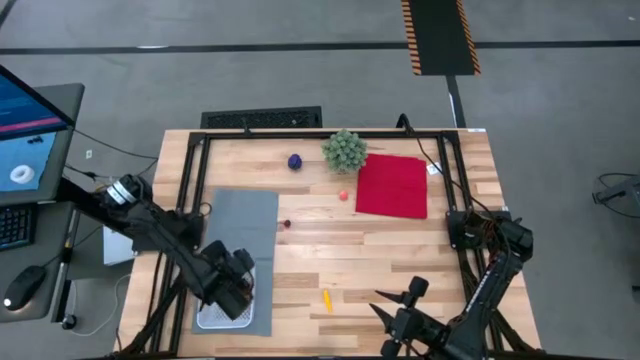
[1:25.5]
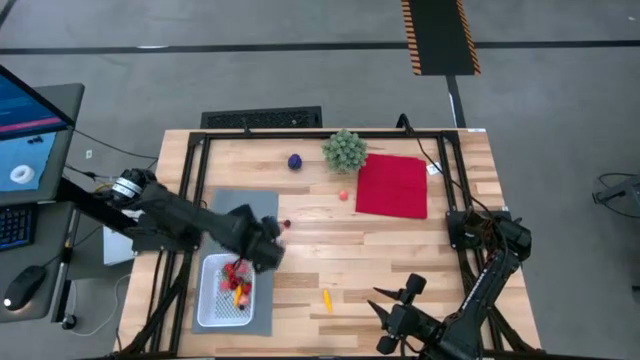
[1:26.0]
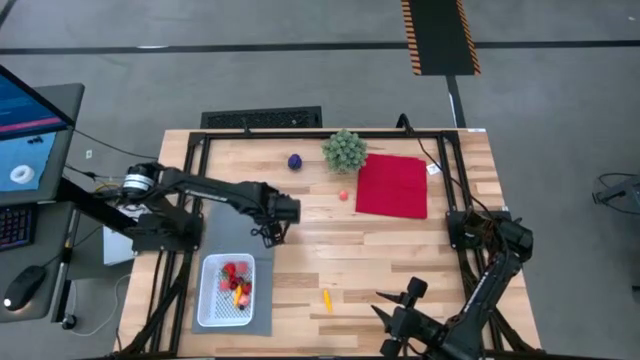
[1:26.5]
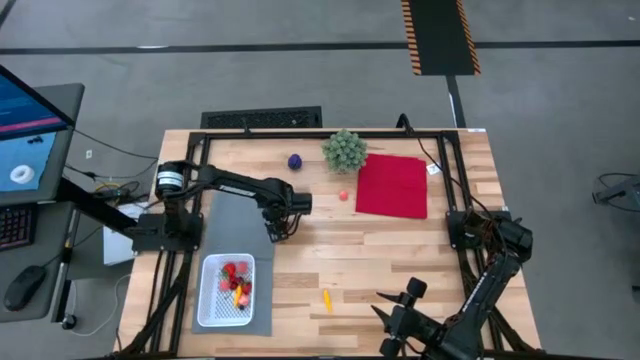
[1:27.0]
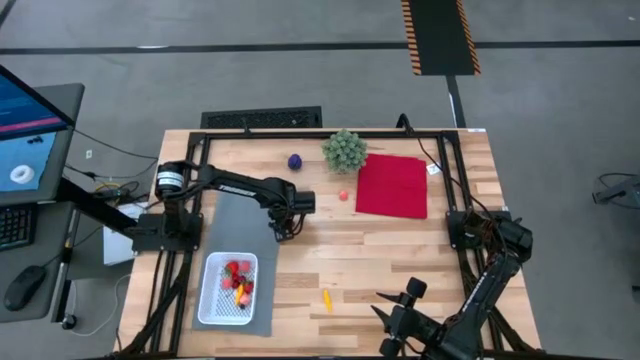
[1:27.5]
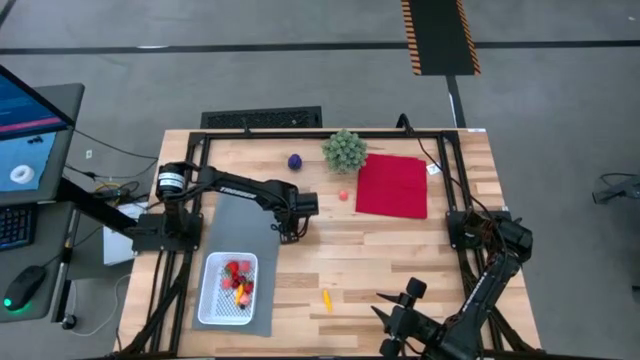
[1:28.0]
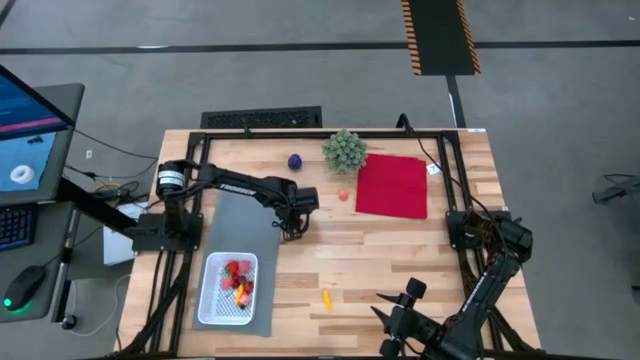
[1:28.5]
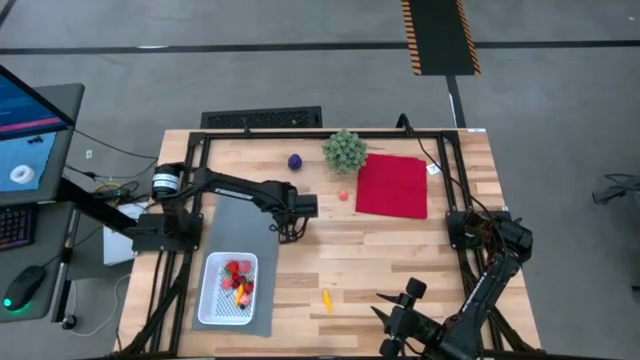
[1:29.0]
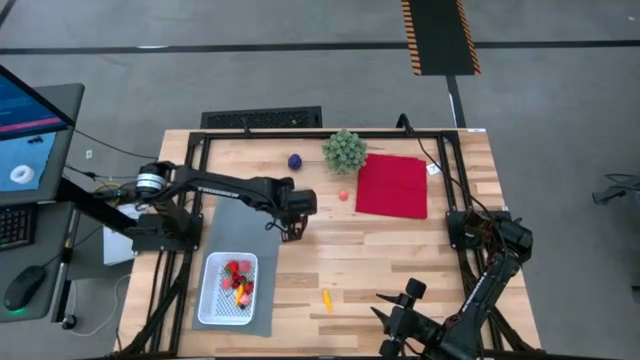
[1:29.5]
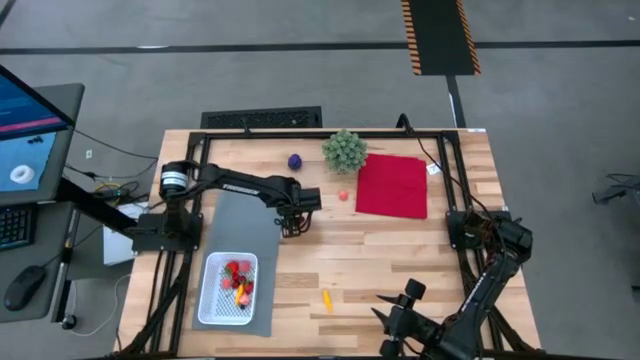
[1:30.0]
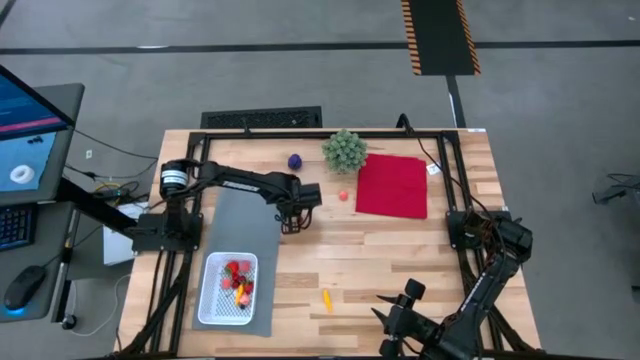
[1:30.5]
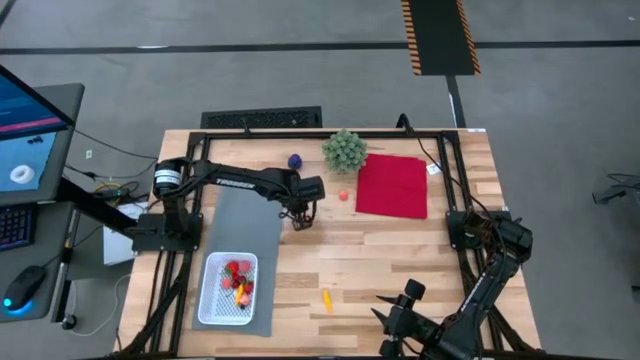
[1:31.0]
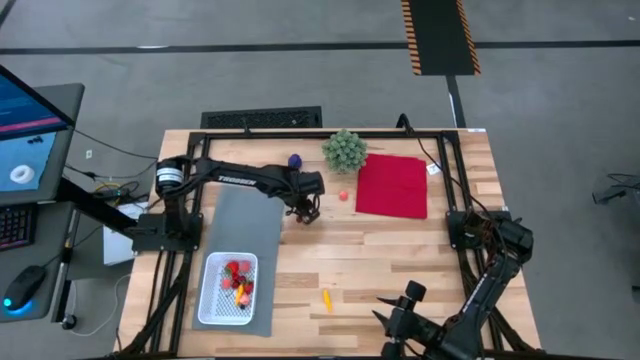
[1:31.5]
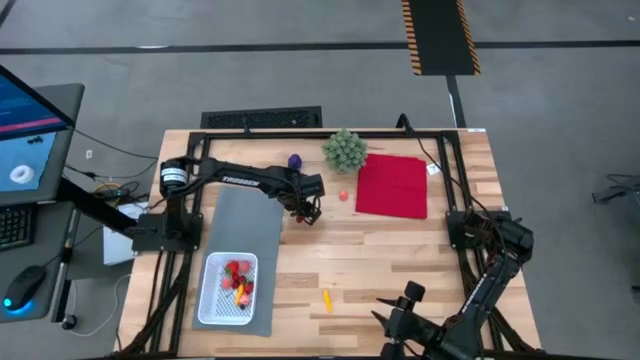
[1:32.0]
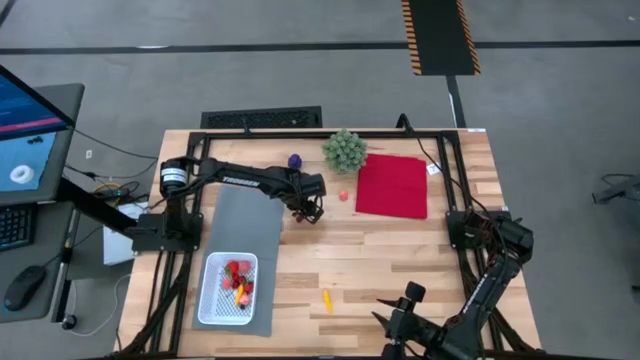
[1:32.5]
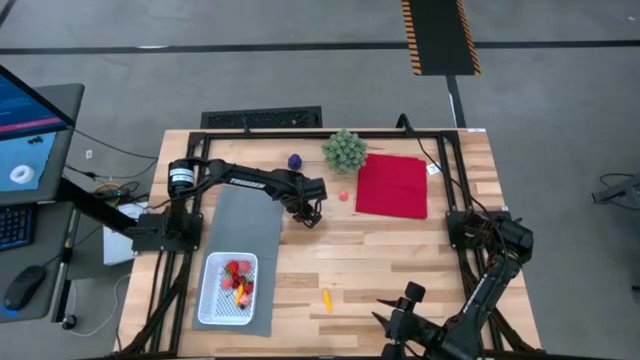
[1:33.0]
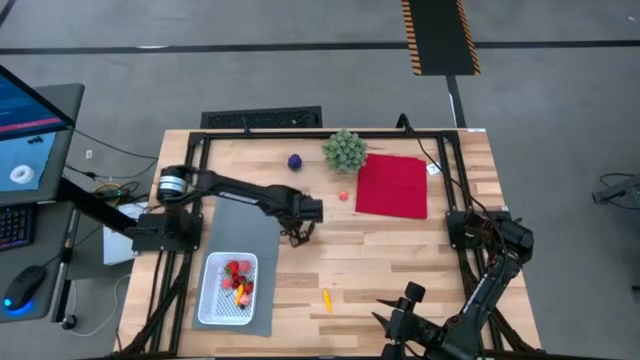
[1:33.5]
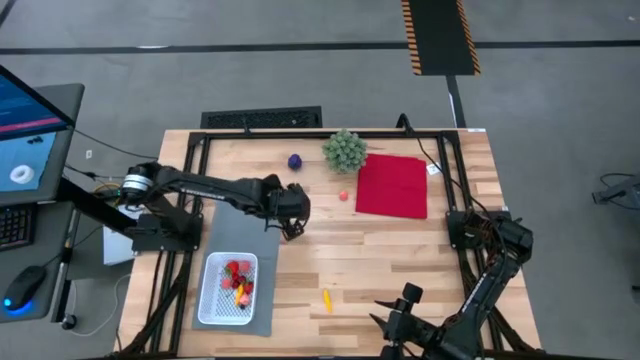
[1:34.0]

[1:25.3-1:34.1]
Task: Pick and placing Produce into tupperware
Put the red cherry into the white basket

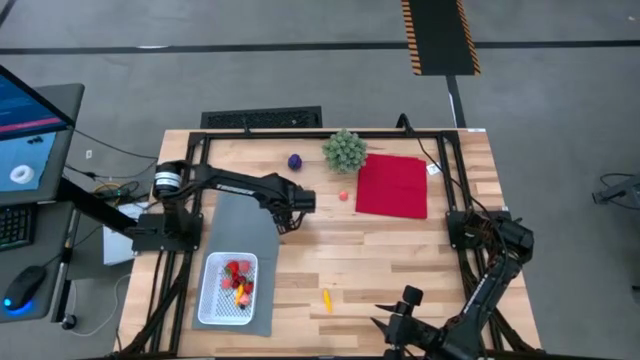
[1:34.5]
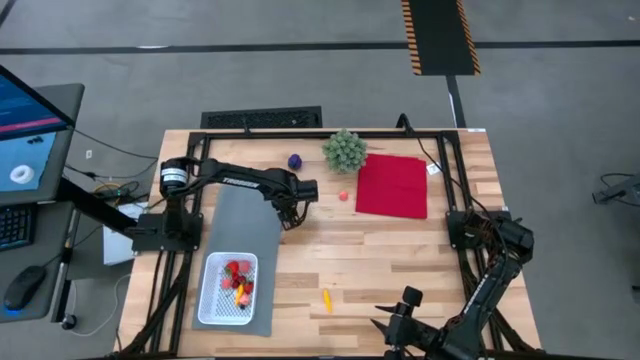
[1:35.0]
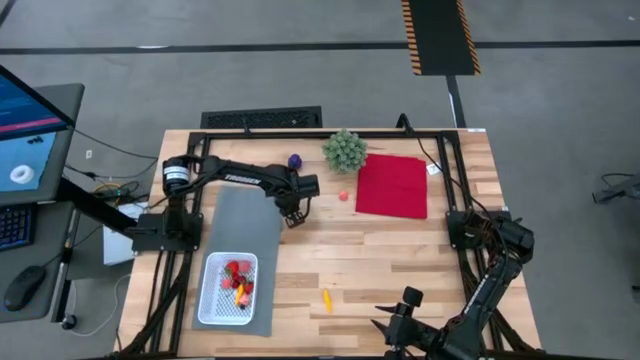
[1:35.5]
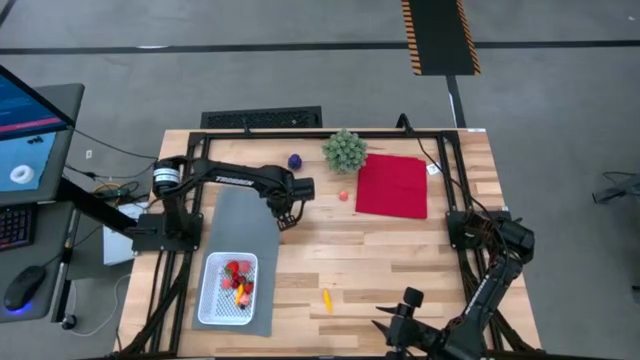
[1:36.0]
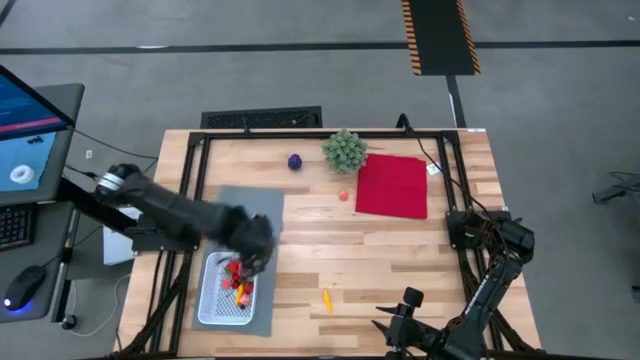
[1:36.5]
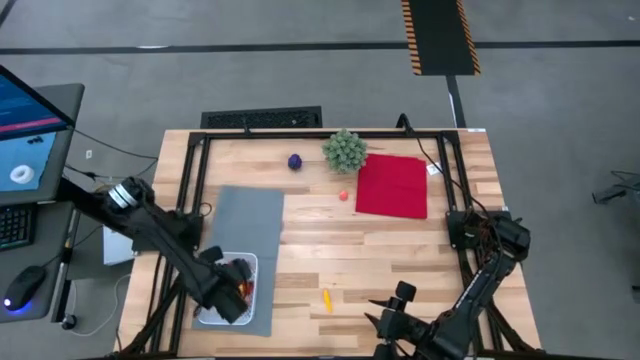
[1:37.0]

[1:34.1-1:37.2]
Put the red cherry into the white basket

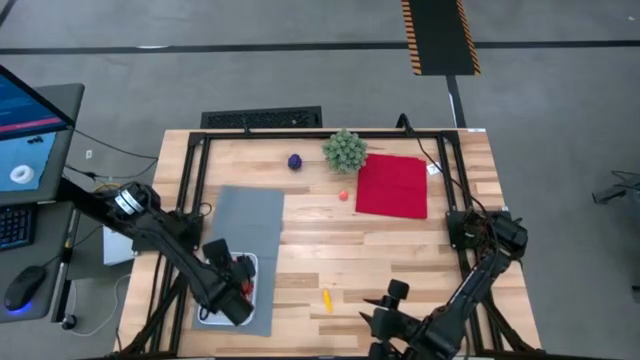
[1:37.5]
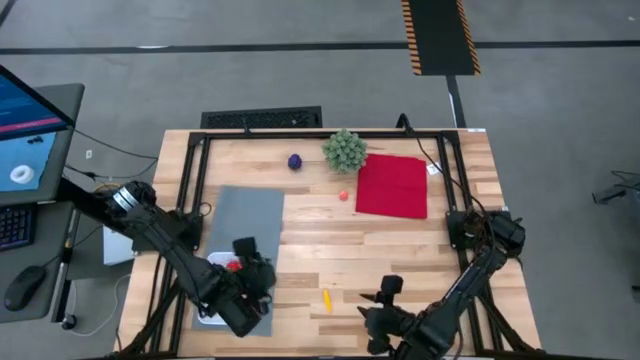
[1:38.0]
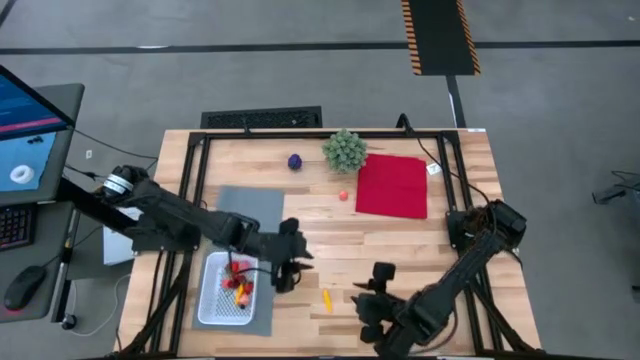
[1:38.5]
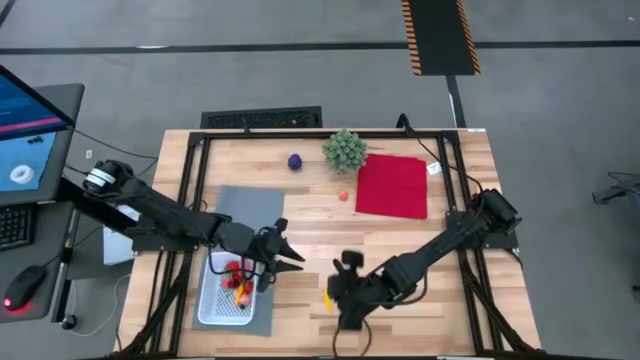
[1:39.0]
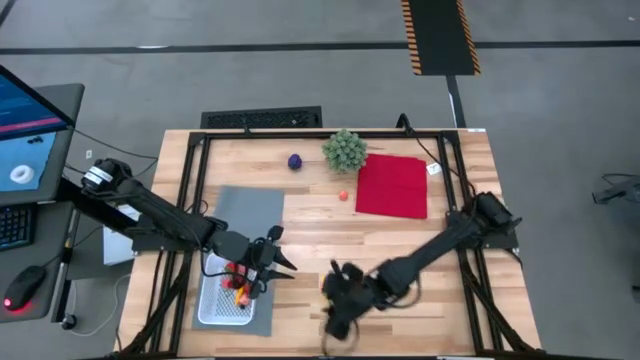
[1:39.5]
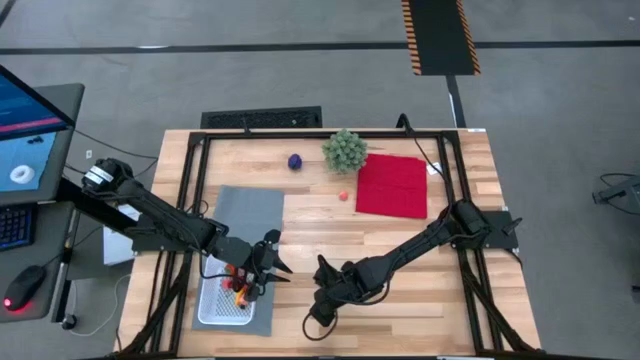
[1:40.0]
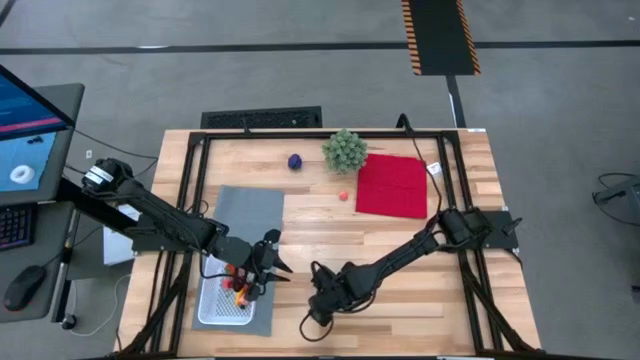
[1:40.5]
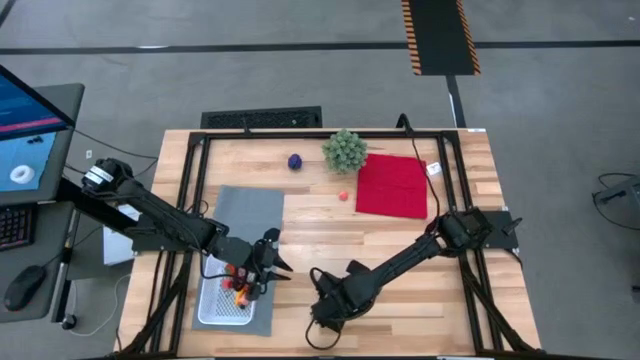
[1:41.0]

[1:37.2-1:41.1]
Put the yellow corn into the white basket

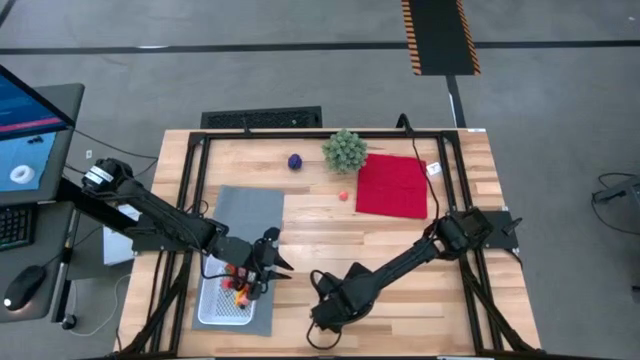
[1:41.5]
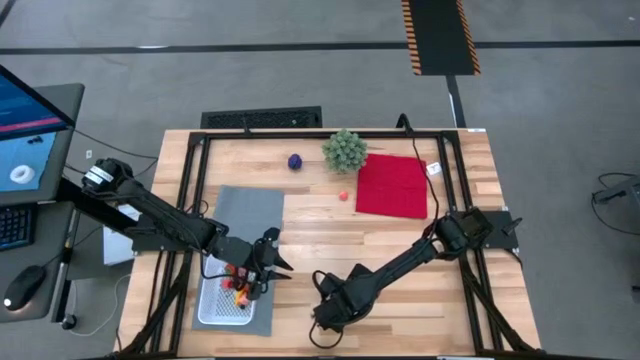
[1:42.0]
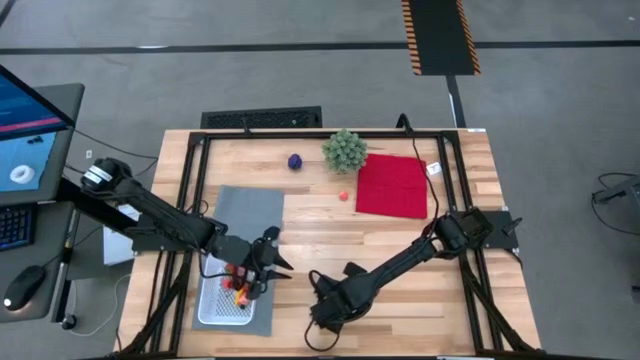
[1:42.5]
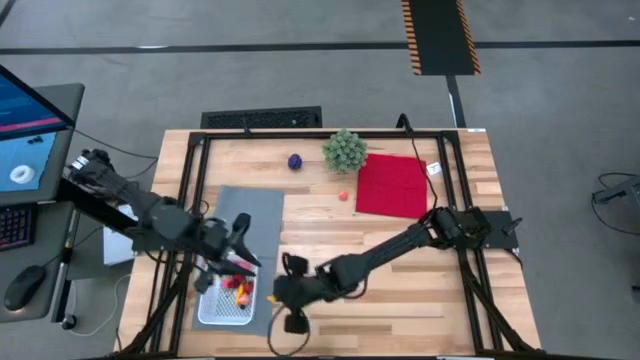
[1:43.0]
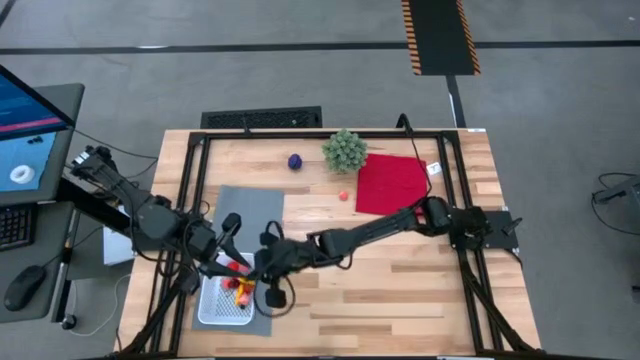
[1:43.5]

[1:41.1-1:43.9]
Put the yellow corn into the white basket

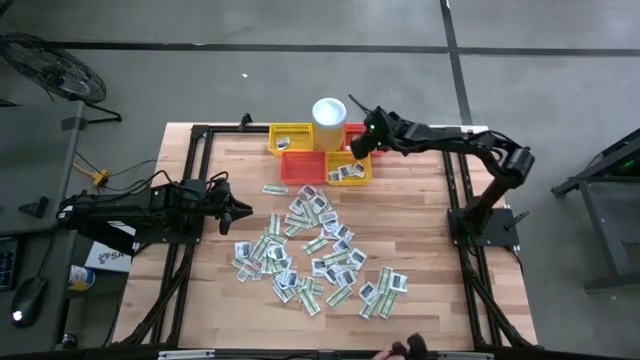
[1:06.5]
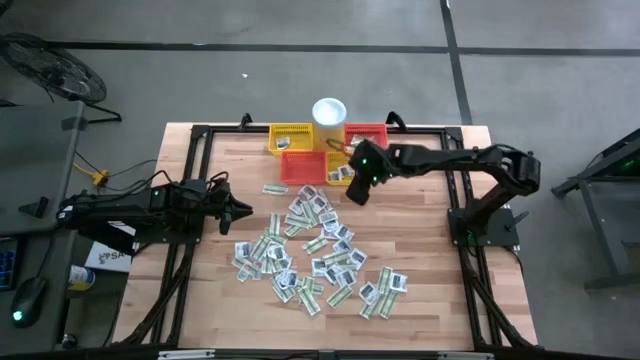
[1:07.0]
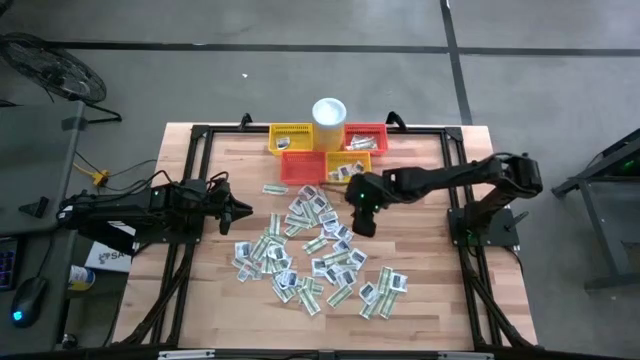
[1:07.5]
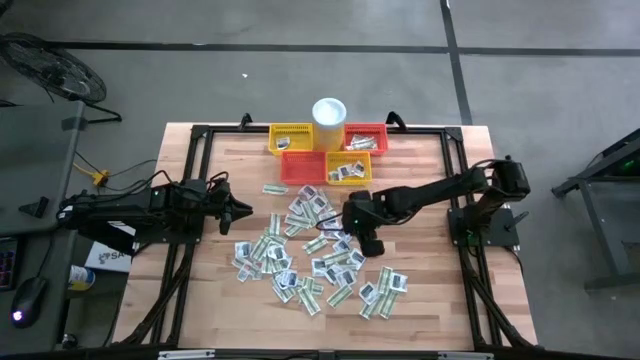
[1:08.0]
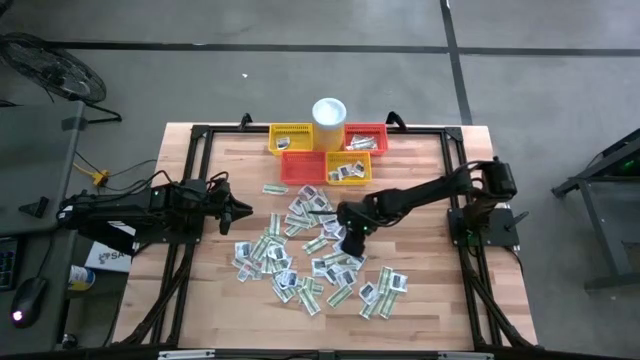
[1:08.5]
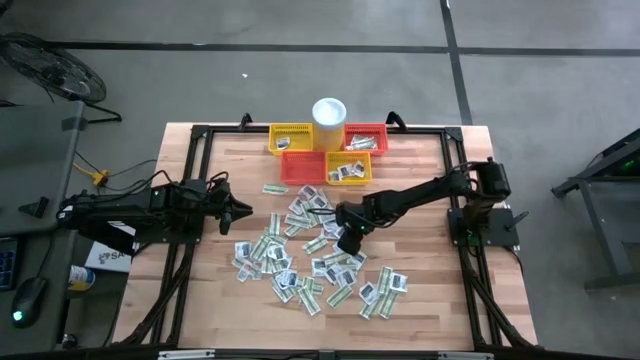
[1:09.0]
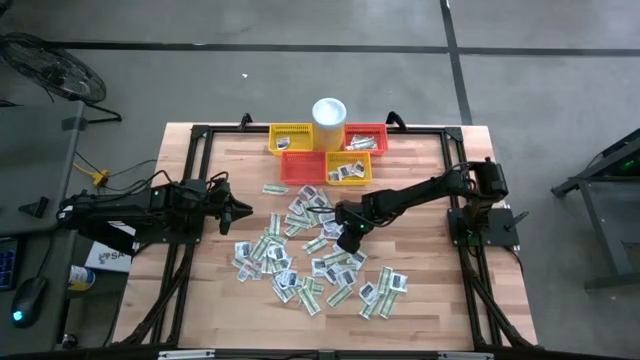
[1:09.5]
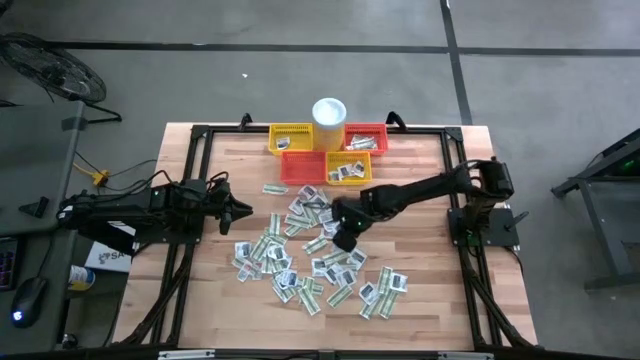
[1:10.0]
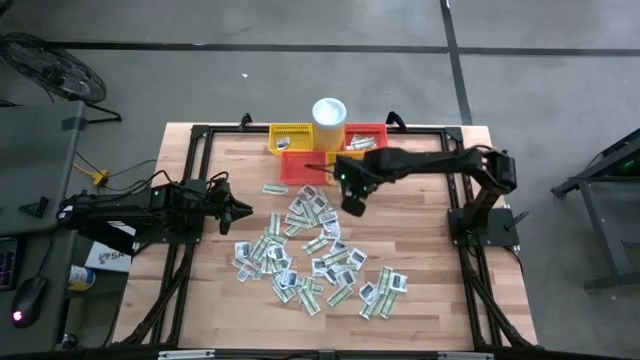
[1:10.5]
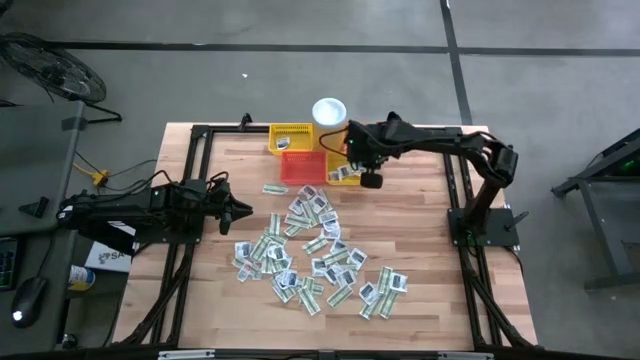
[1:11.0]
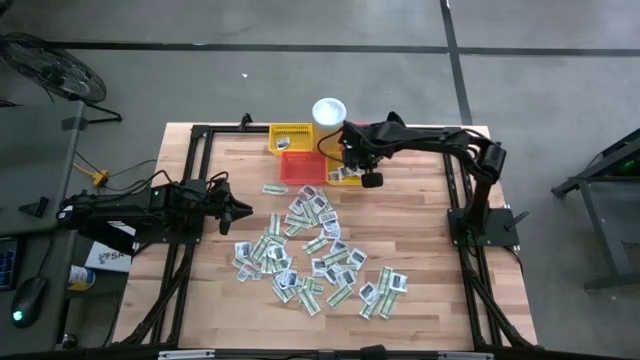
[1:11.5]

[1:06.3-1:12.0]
Task: Pick & Place First Aid Supplies
Put the black towelette pack into the bottom yellow basket
